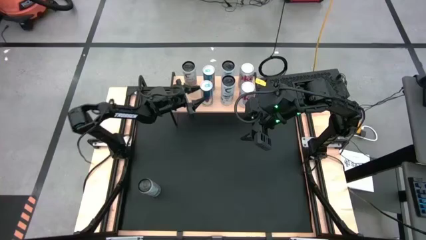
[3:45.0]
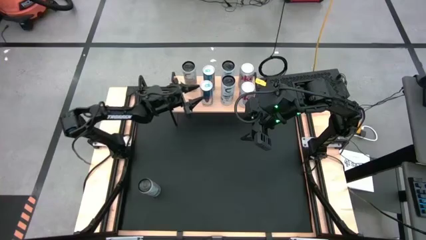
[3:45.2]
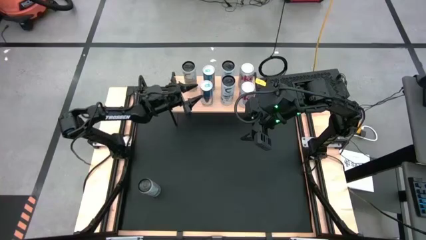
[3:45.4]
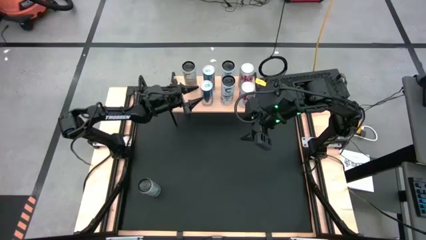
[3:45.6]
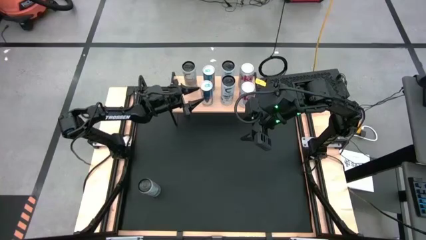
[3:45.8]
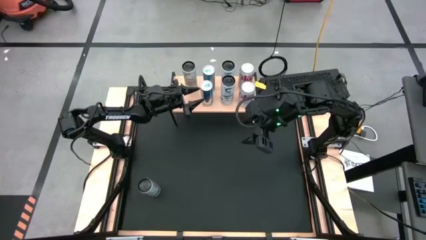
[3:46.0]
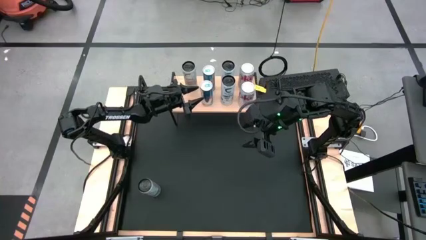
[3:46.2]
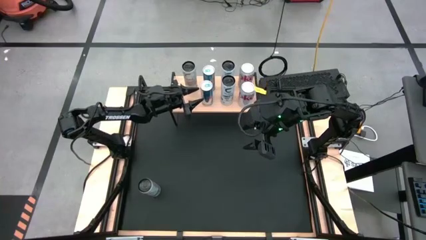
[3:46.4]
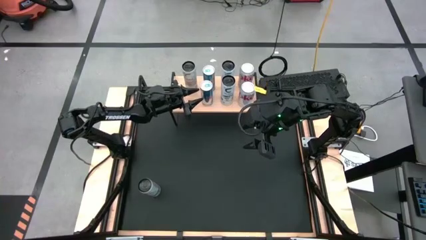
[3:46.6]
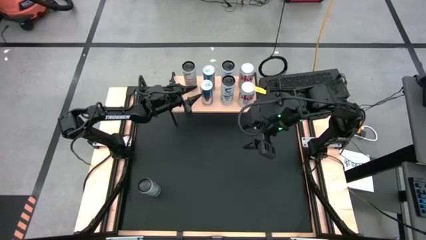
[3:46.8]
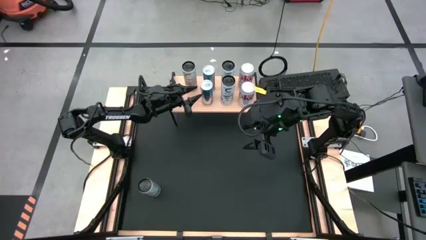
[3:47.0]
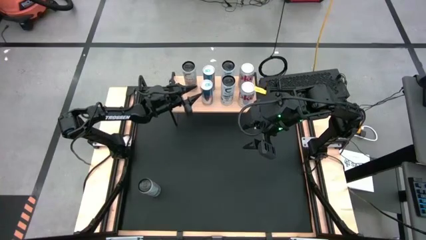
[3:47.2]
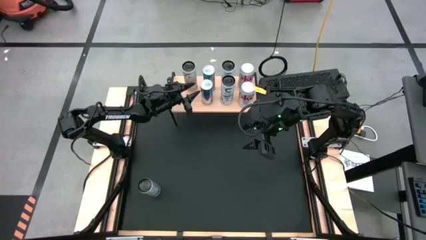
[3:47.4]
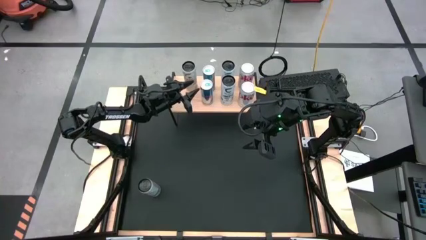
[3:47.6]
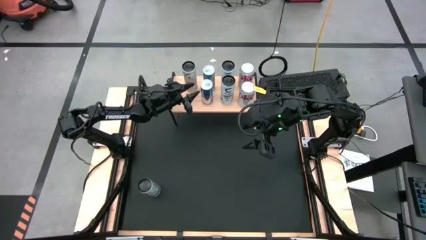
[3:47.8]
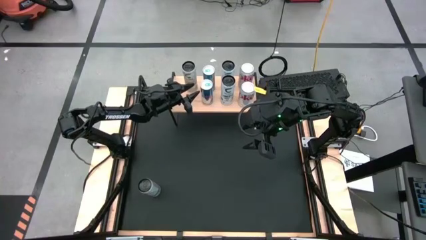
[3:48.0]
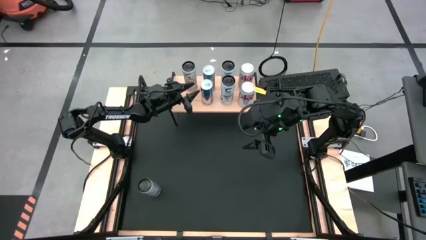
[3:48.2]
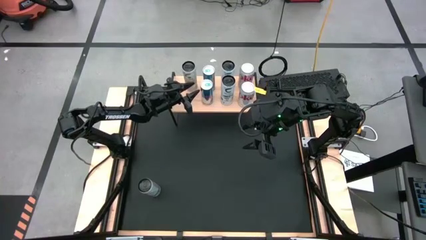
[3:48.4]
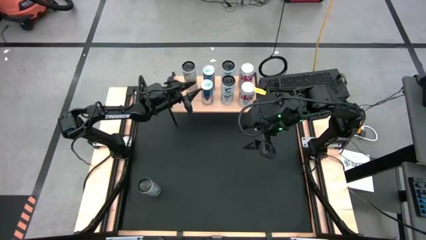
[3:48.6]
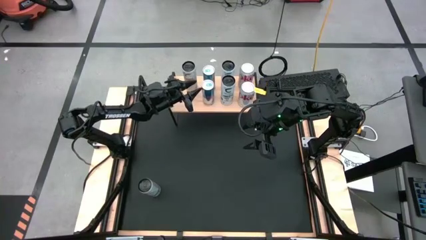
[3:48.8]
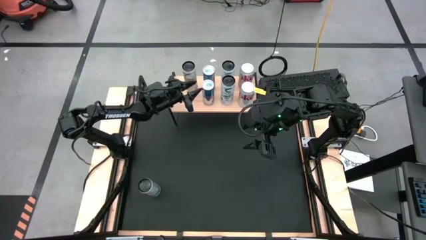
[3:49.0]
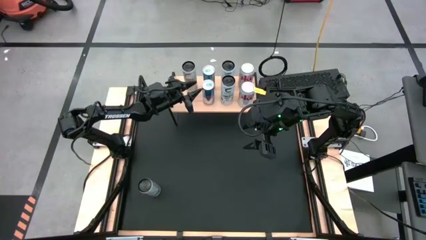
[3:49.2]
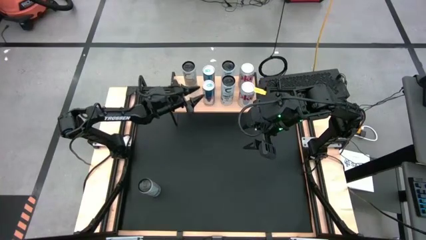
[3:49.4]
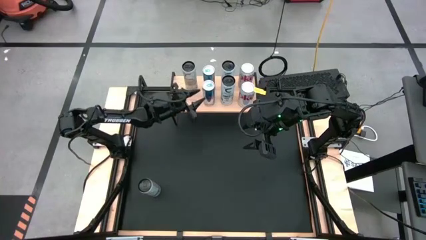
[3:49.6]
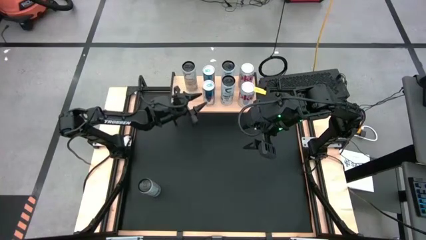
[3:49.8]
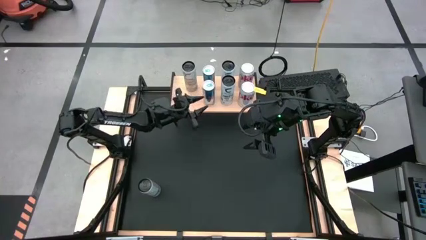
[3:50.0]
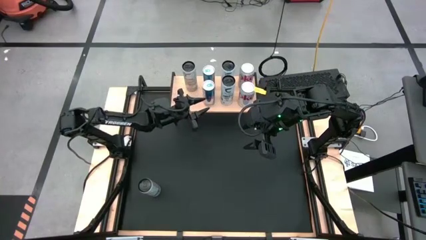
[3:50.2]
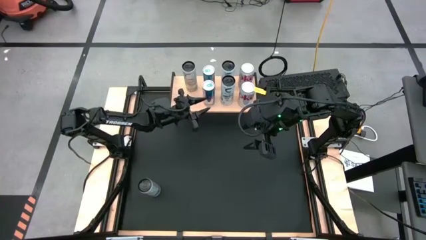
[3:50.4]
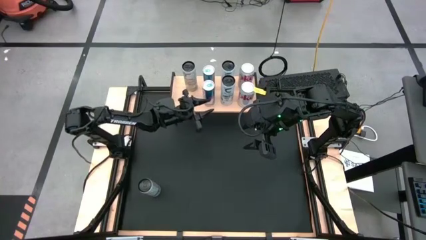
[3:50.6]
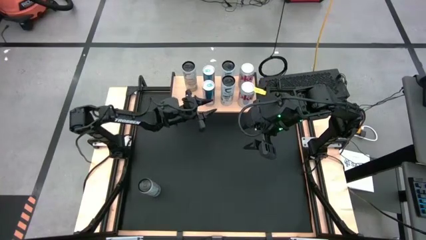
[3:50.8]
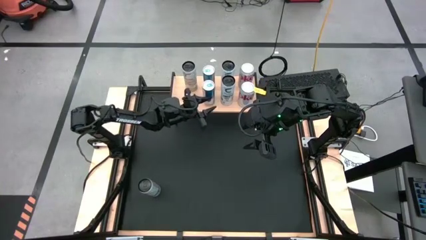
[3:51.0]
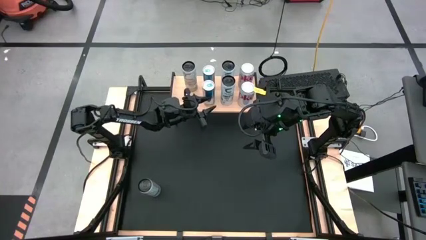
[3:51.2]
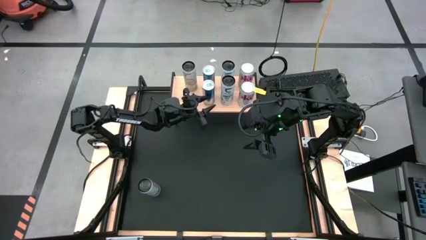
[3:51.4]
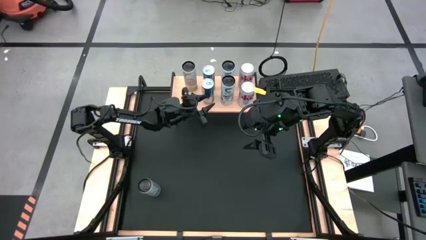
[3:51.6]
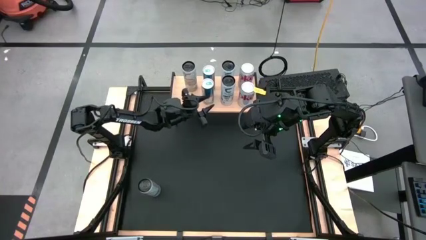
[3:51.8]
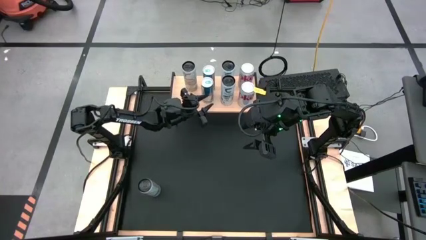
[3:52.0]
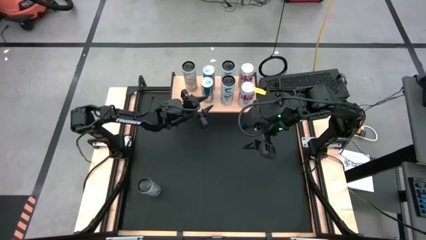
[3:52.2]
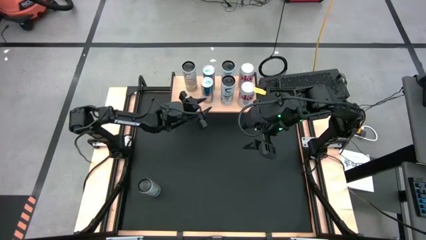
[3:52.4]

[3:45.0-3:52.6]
Task: Place canned beverage on shelf
Adjust the blue soda can

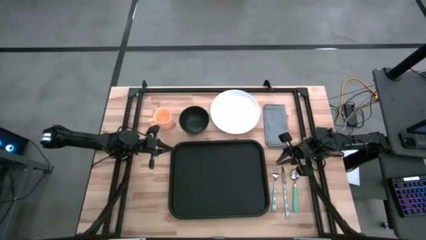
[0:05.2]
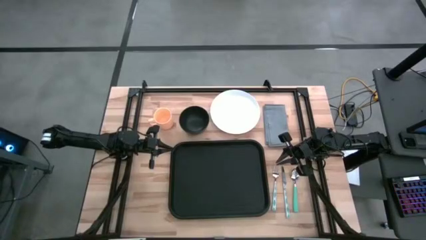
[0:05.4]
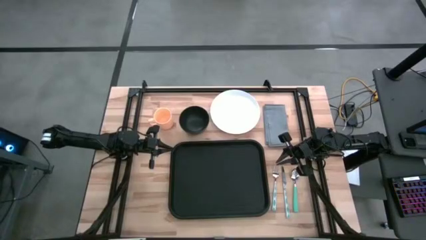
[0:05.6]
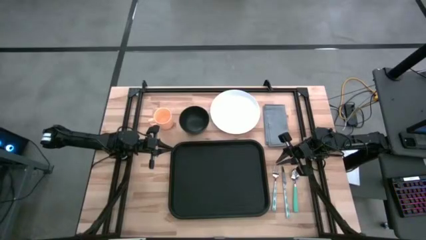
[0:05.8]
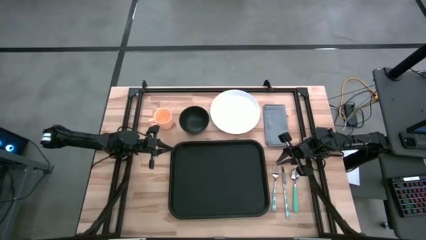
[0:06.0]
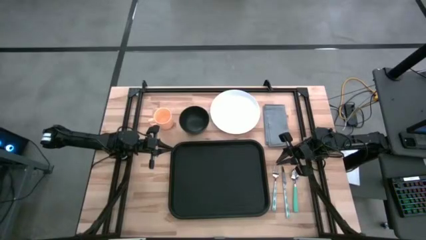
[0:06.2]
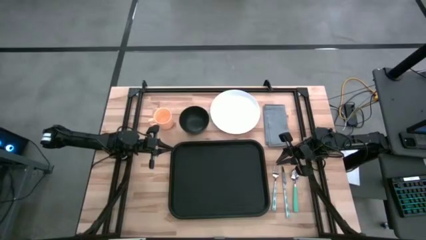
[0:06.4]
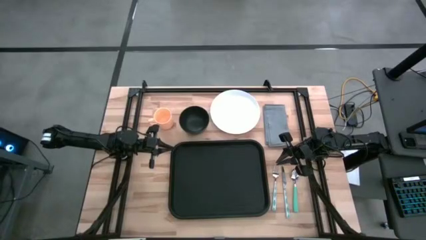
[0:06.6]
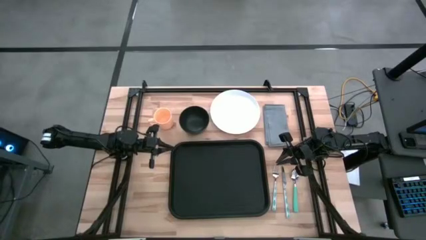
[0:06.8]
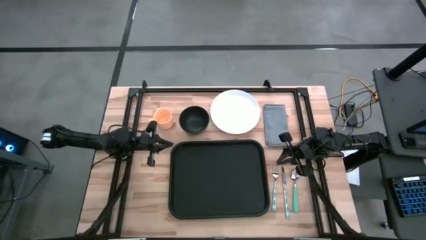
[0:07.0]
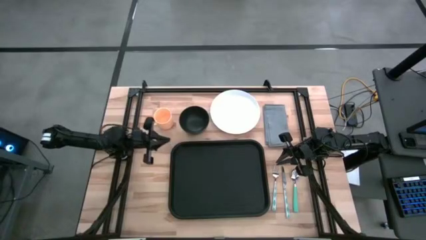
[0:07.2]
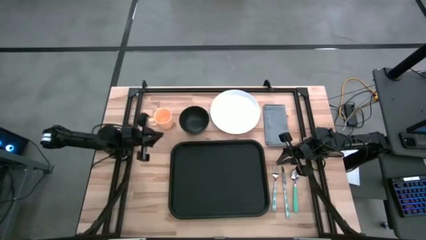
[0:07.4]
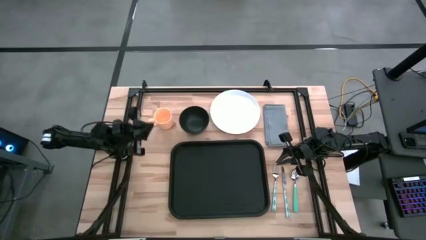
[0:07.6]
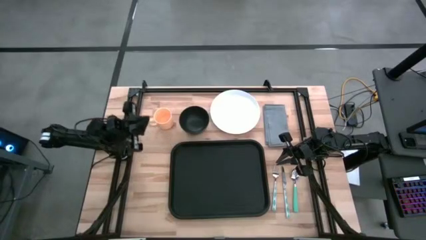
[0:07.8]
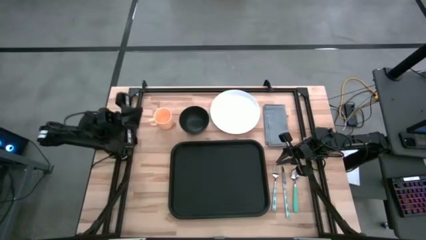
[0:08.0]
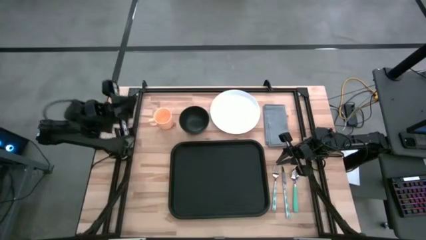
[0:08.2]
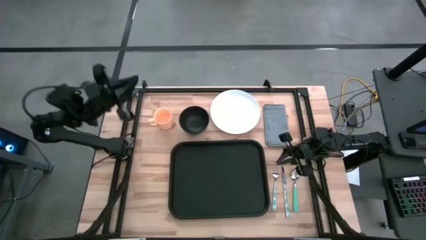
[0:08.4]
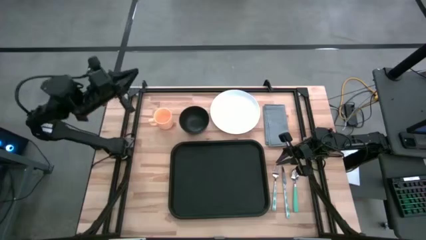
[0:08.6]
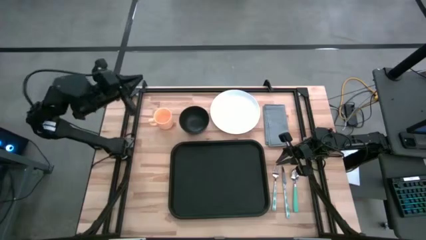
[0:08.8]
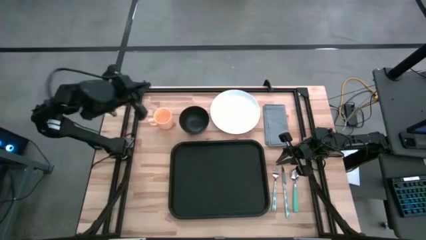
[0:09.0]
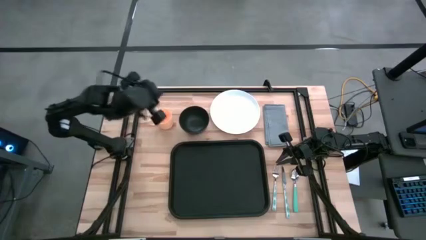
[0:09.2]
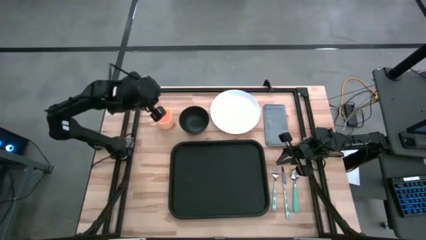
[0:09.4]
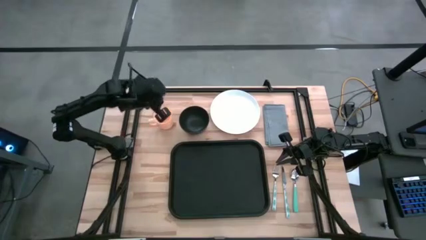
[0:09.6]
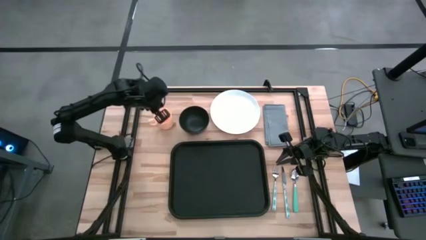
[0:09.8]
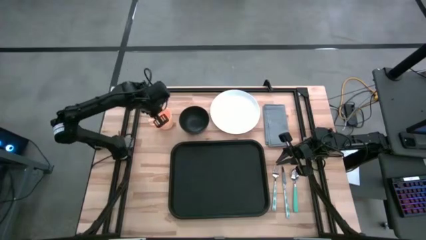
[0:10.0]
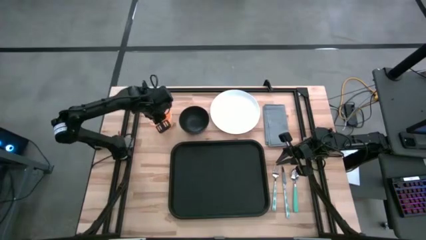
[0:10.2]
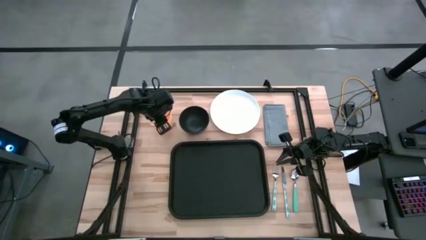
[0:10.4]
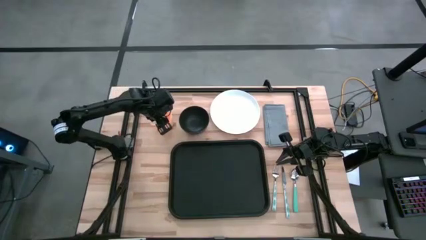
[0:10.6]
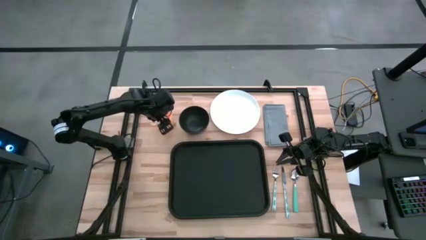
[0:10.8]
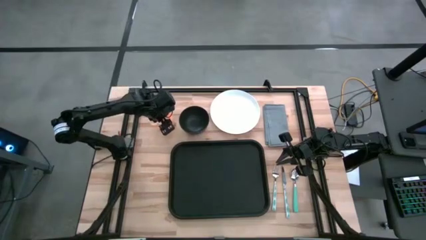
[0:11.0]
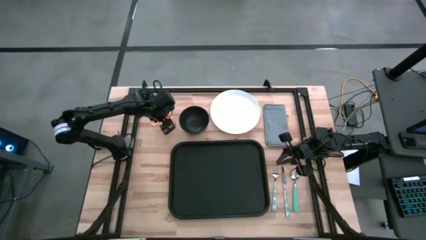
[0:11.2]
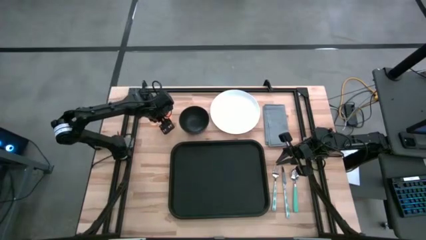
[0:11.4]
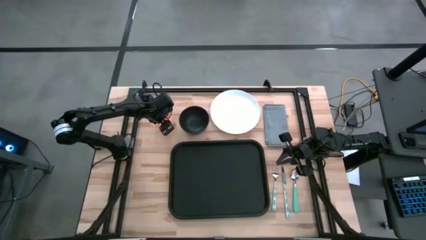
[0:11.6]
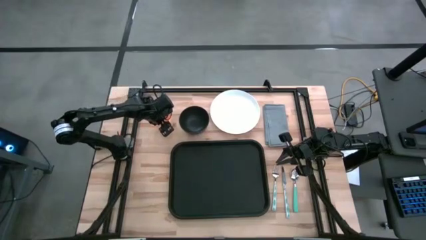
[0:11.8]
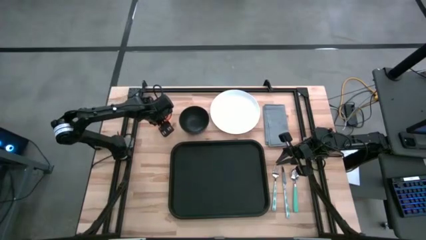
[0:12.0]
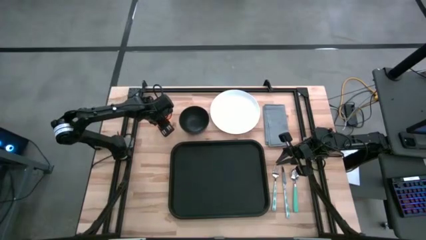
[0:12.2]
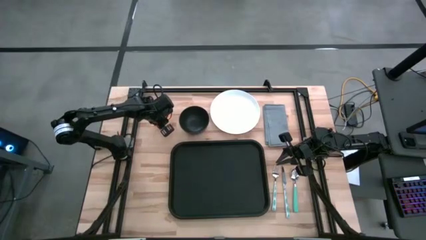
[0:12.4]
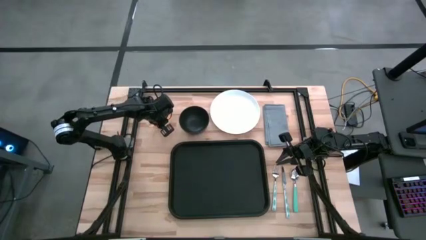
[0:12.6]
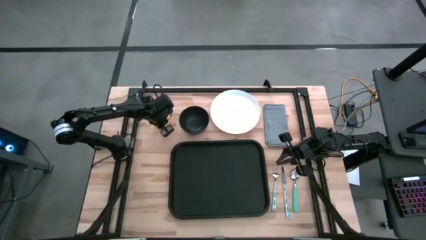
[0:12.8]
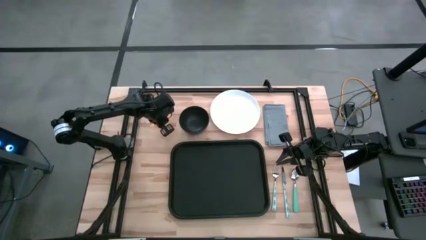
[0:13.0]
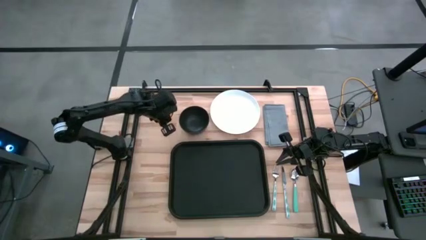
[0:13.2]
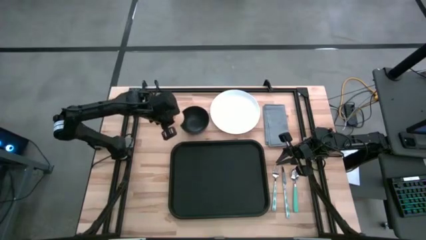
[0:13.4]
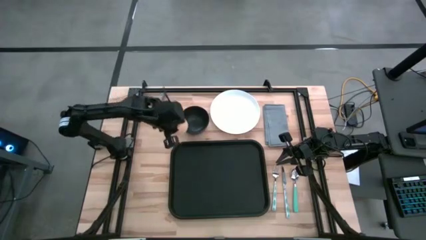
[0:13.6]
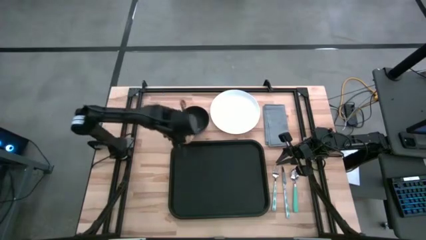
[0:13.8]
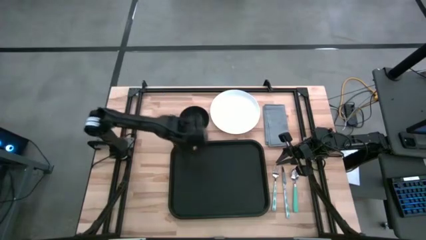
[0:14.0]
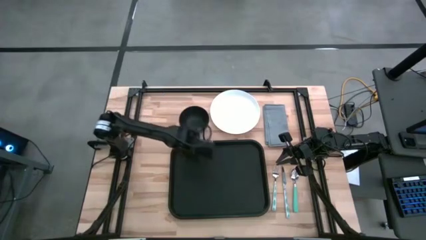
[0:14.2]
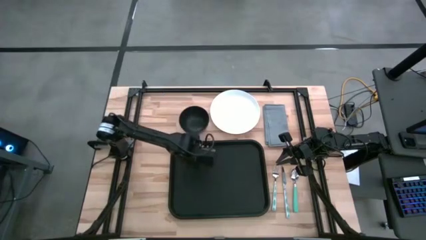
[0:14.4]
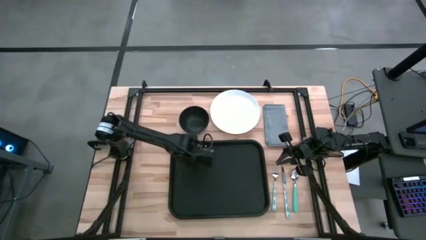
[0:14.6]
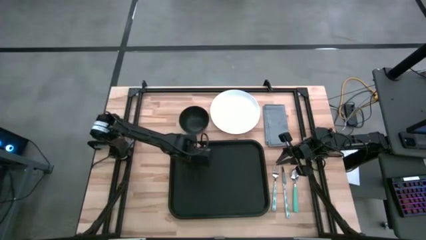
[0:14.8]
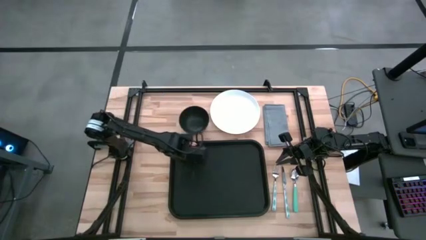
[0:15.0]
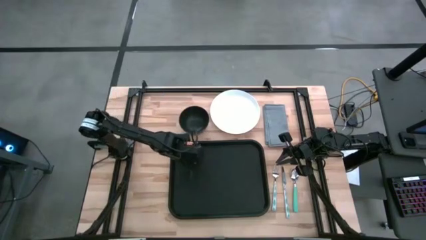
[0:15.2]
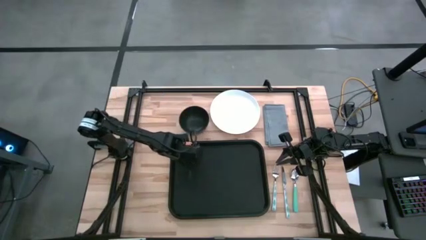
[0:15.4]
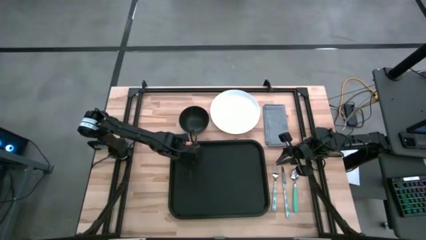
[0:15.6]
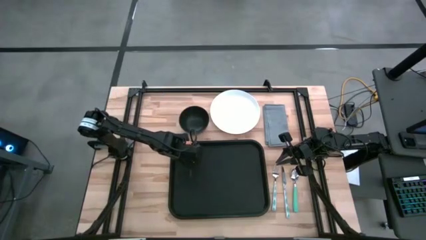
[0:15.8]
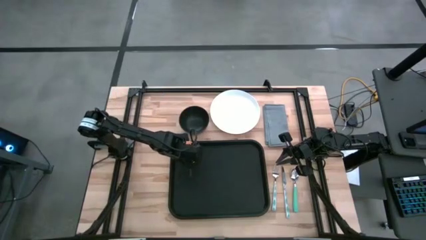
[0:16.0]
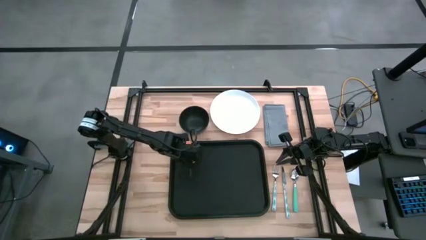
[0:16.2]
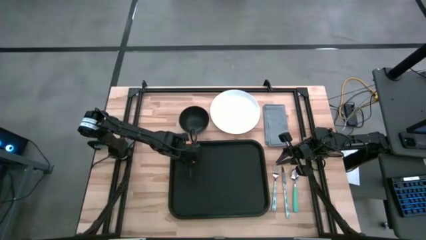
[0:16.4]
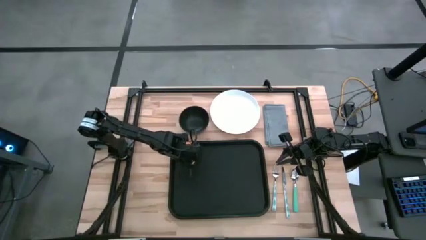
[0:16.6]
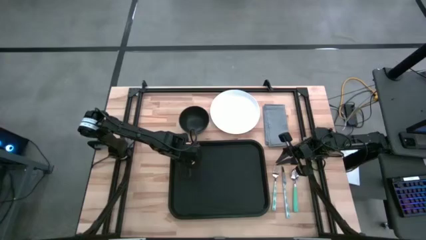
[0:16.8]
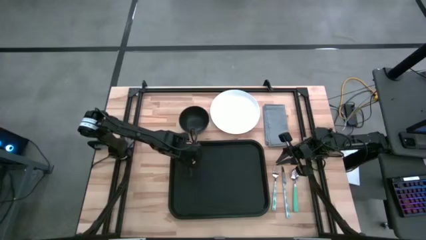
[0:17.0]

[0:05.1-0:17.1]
Task: Set up tray
Put the orange mug on the black serving tray
